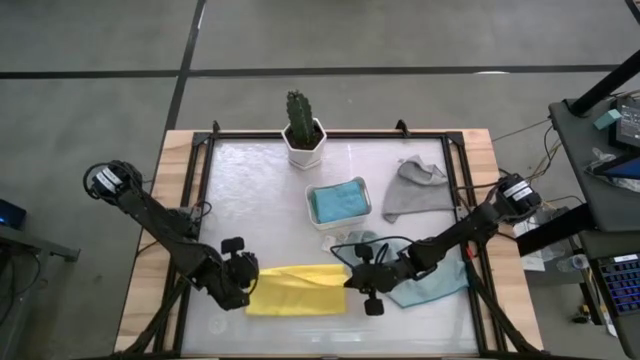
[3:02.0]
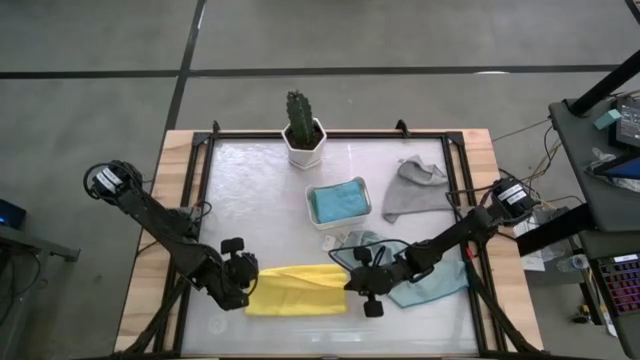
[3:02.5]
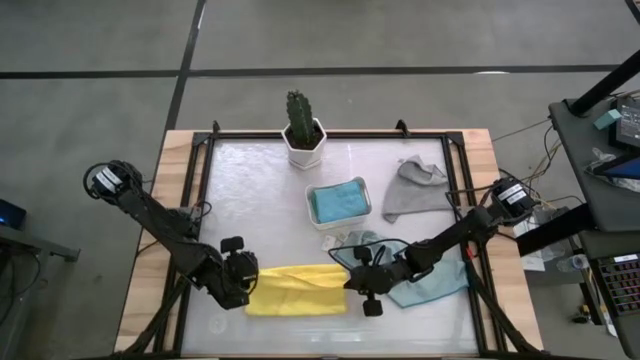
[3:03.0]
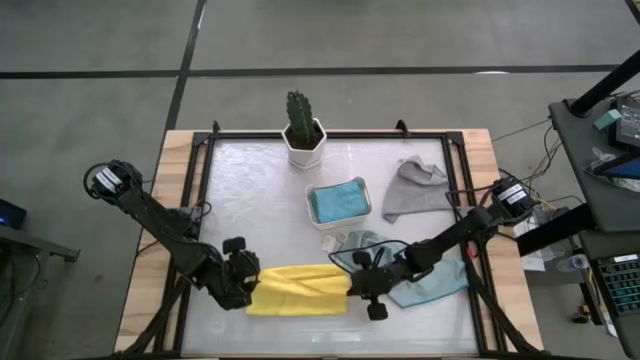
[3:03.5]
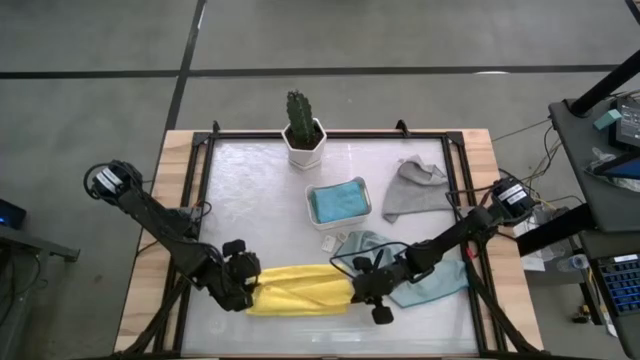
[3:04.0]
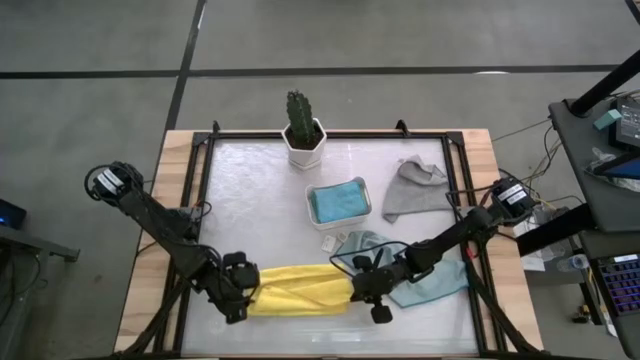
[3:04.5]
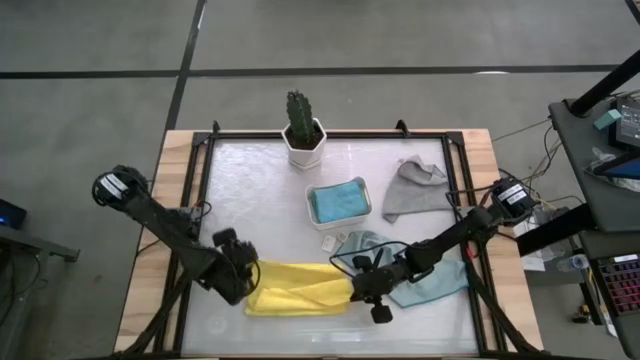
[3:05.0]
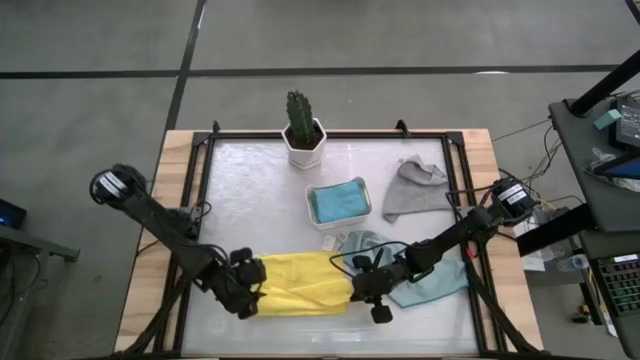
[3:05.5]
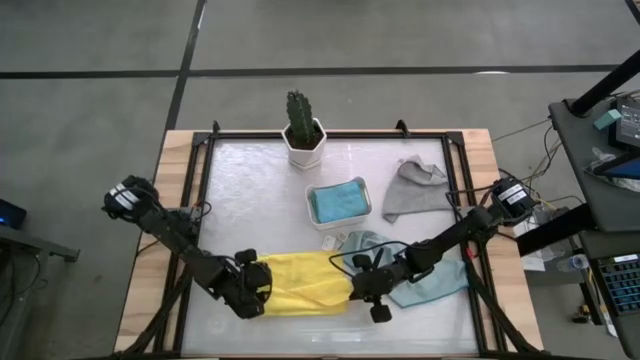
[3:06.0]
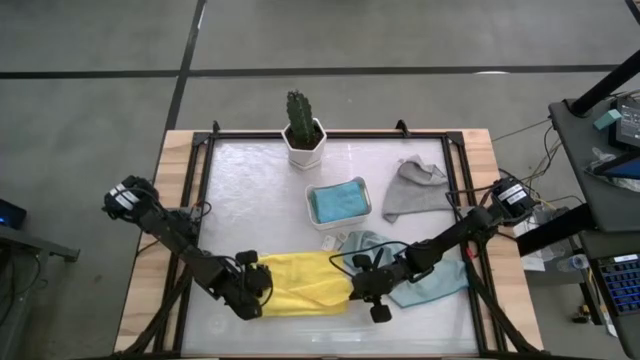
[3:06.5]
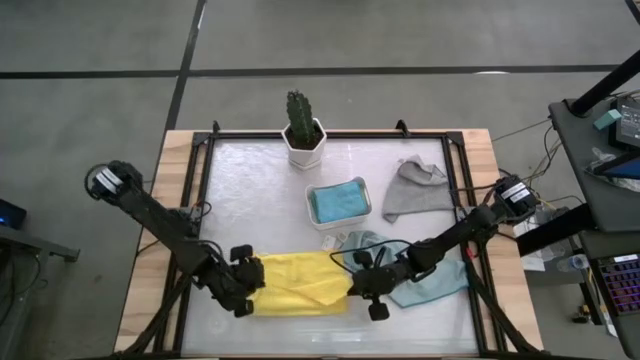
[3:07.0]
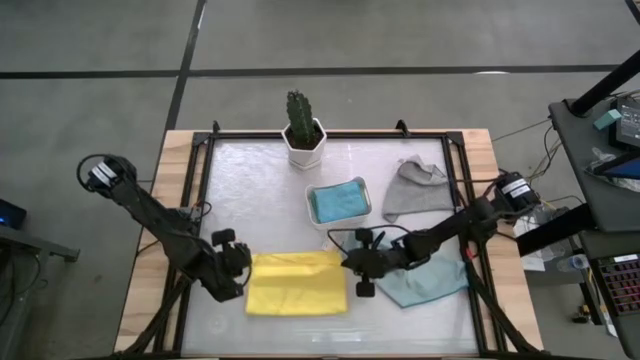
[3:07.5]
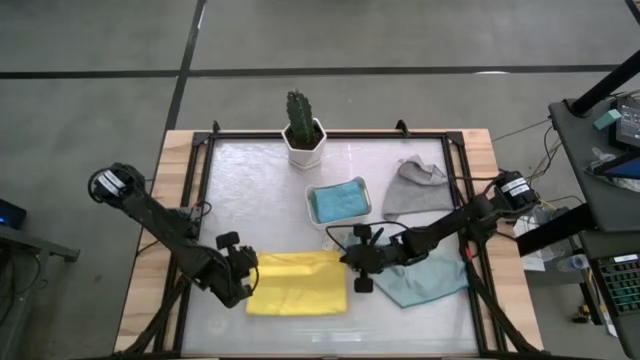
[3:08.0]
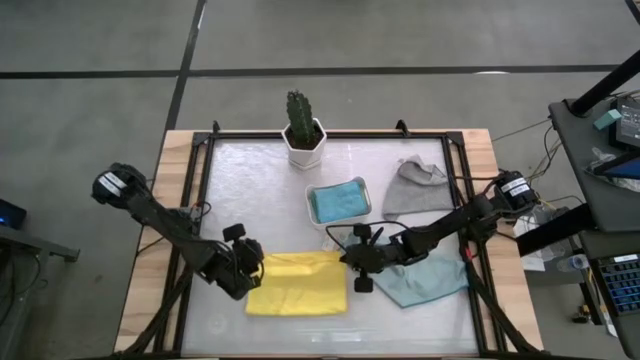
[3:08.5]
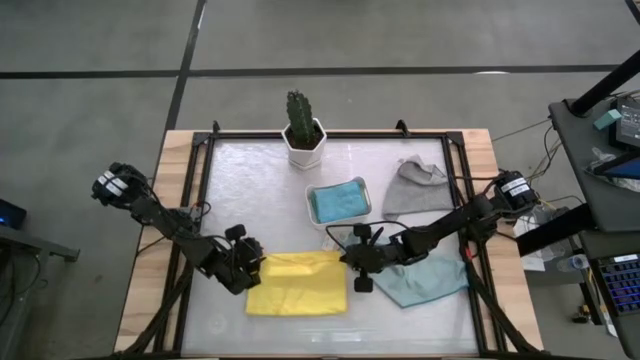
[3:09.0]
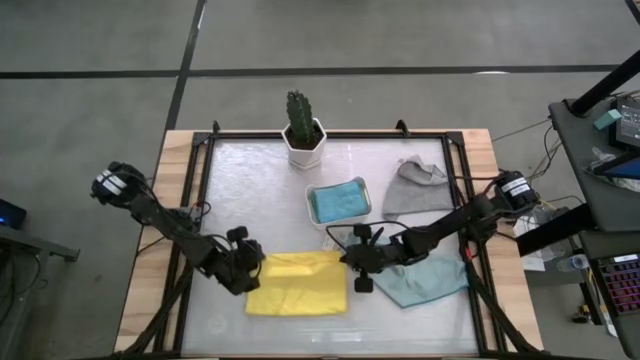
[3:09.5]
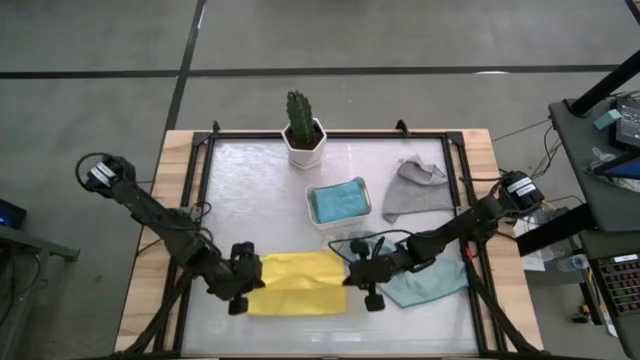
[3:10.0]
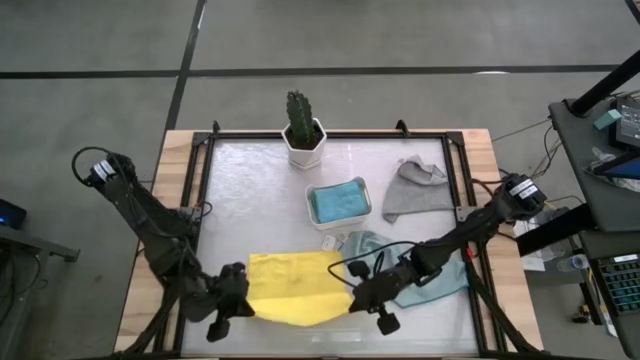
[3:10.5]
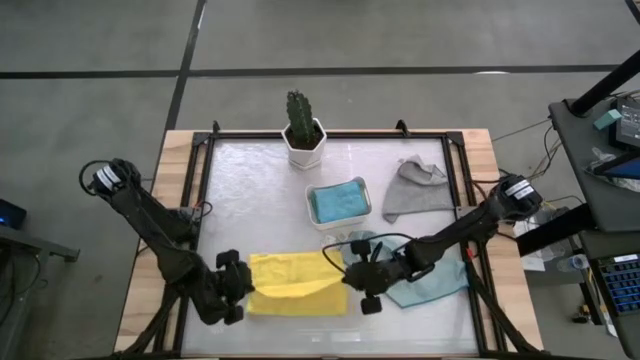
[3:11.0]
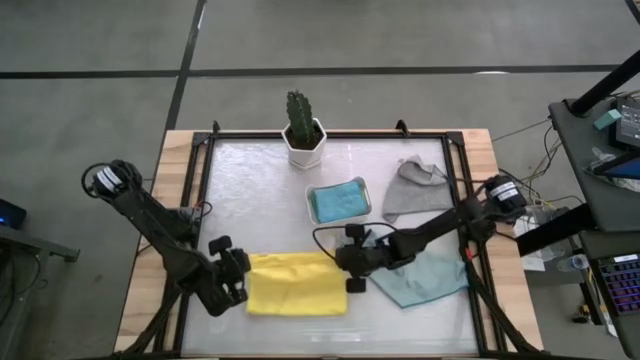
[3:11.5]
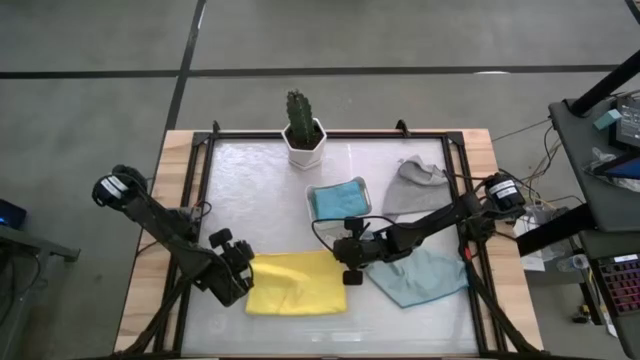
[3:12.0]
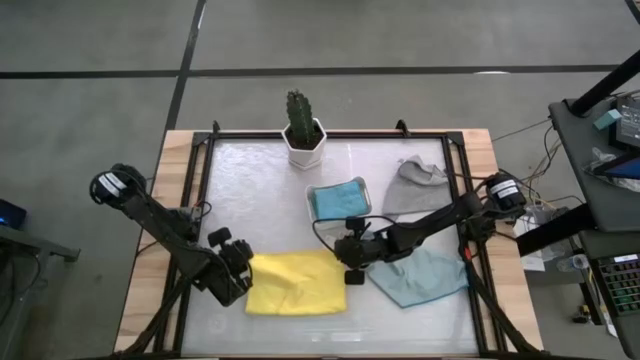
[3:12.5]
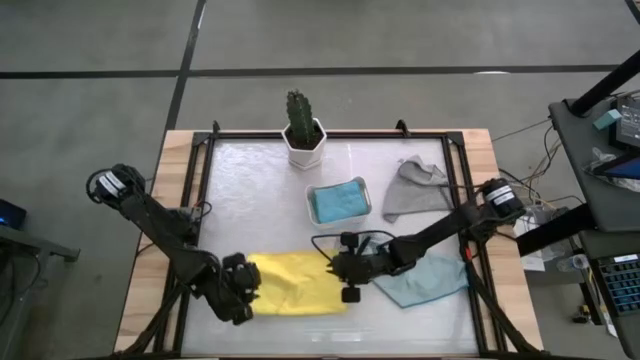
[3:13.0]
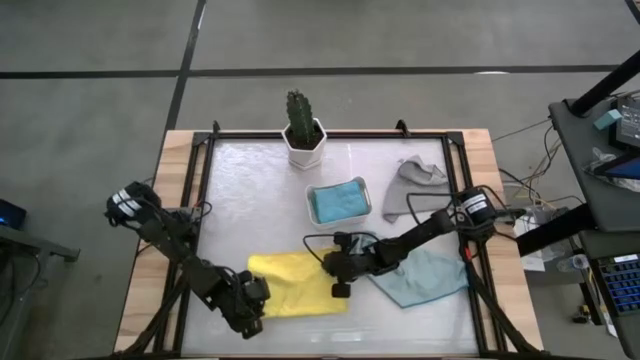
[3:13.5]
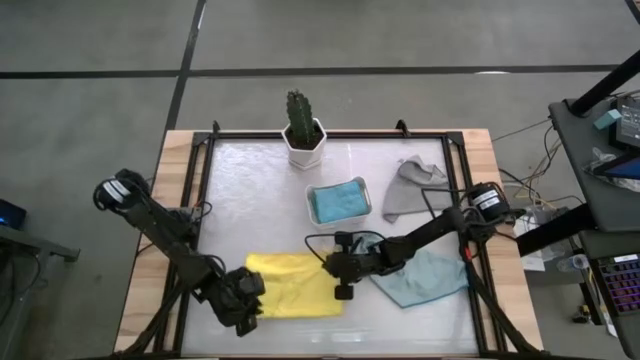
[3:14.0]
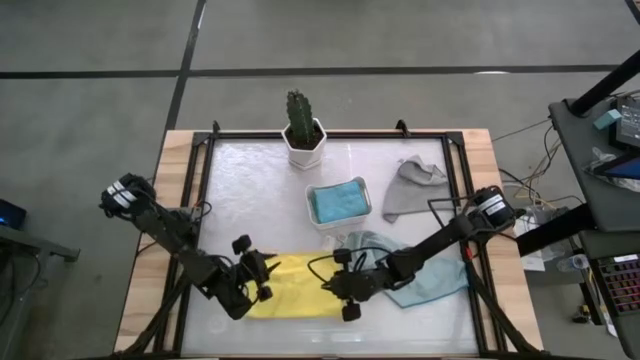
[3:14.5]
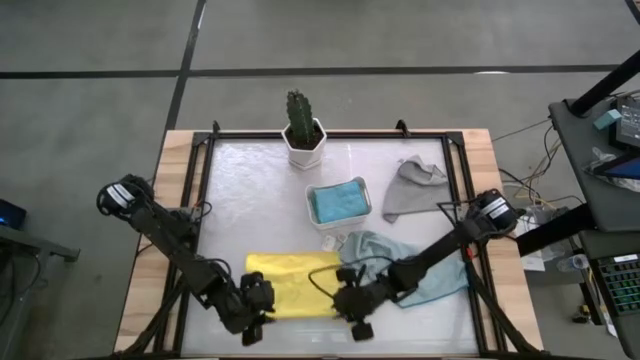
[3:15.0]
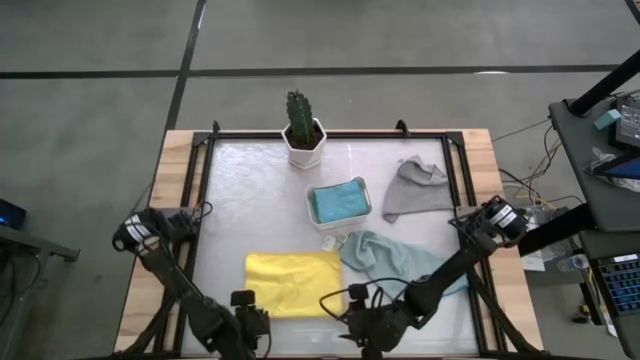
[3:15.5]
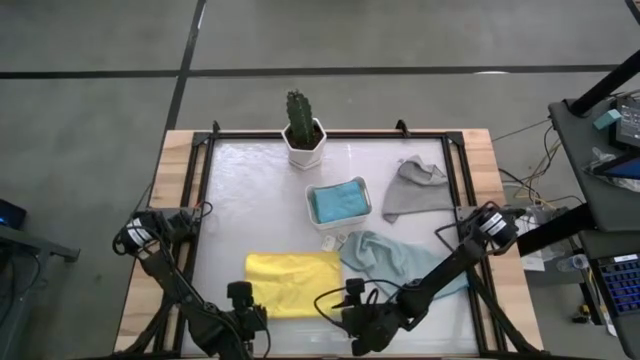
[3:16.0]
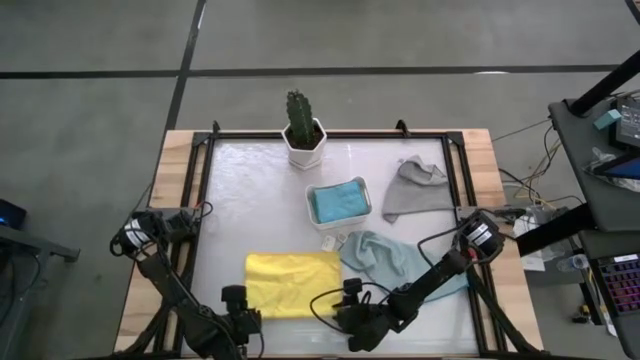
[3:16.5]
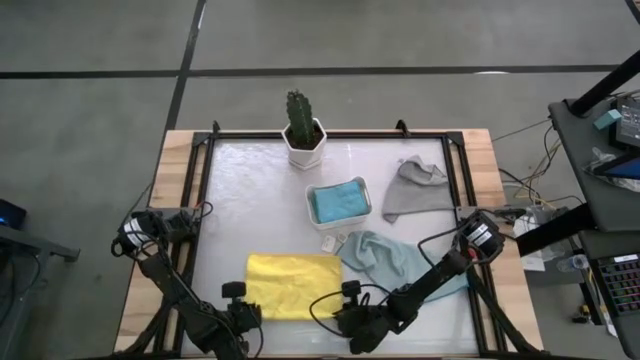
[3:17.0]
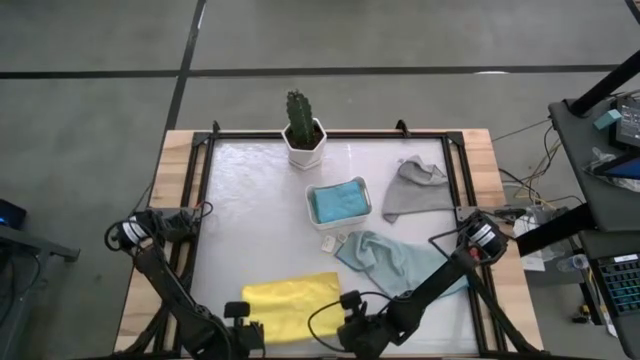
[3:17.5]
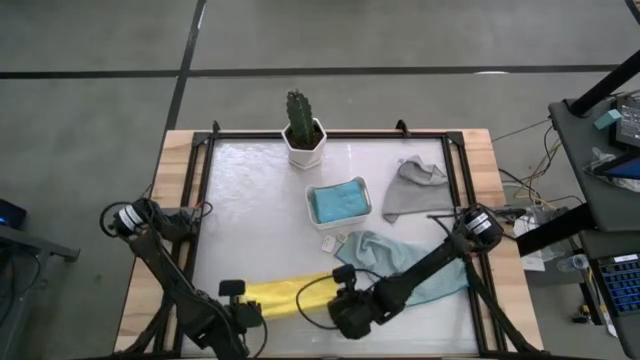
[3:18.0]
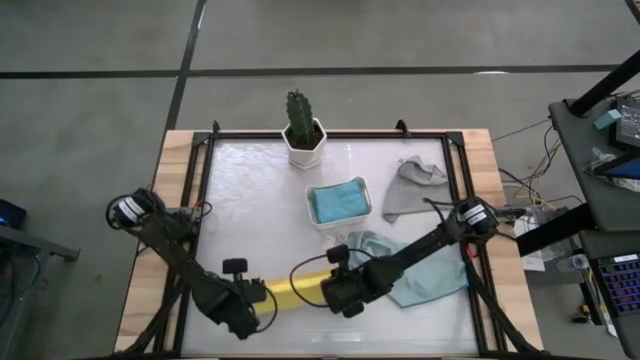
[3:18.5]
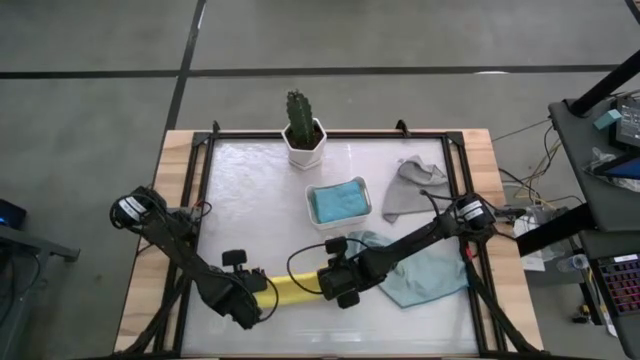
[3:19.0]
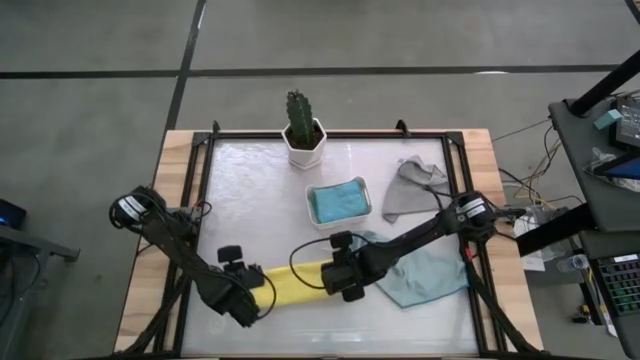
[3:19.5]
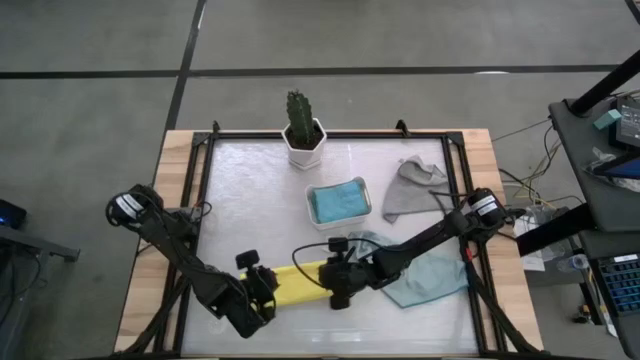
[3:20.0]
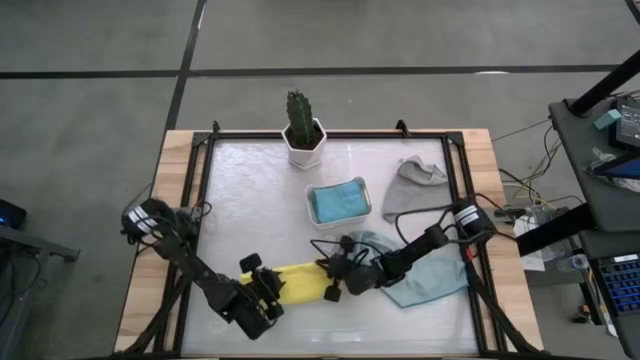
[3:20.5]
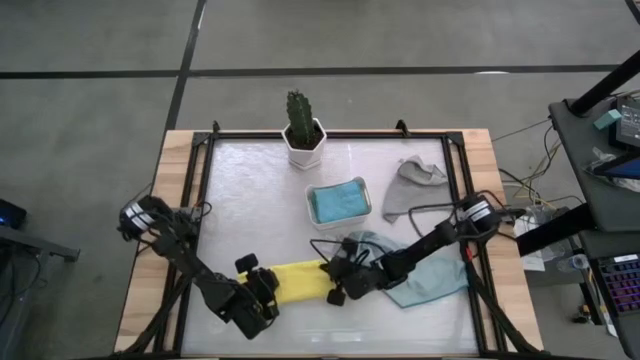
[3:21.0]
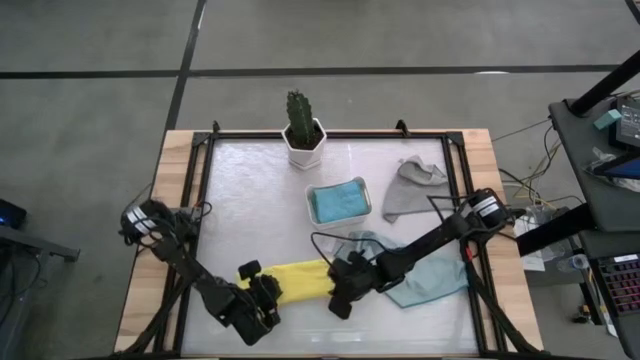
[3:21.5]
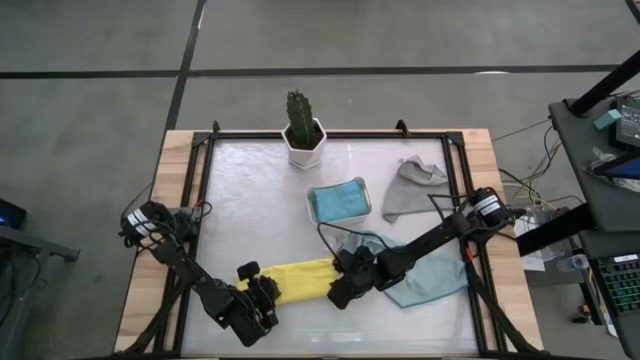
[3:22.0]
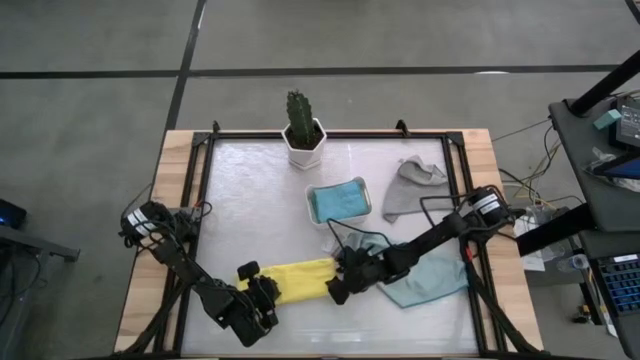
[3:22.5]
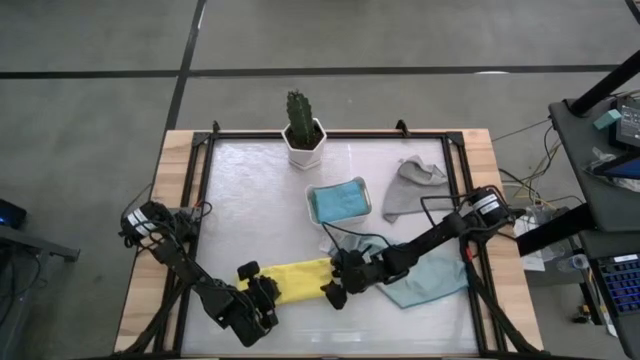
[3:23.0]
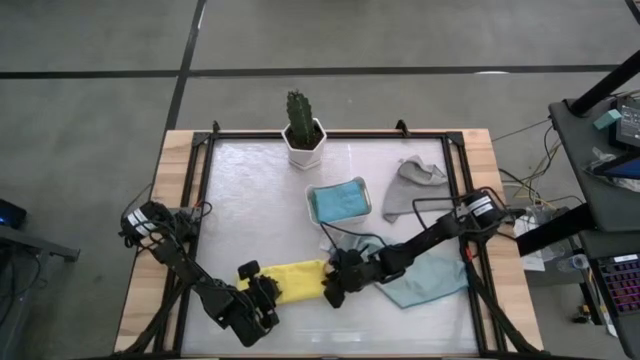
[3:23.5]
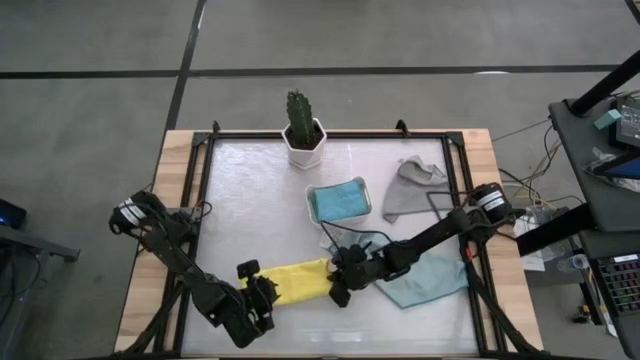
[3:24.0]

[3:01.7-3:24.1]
Task: Fold microfiber towels
Fold the yellow towel
